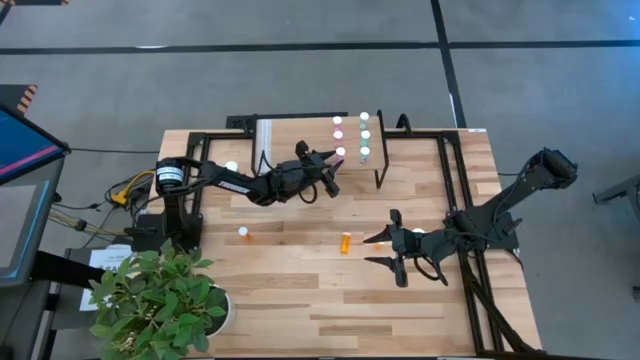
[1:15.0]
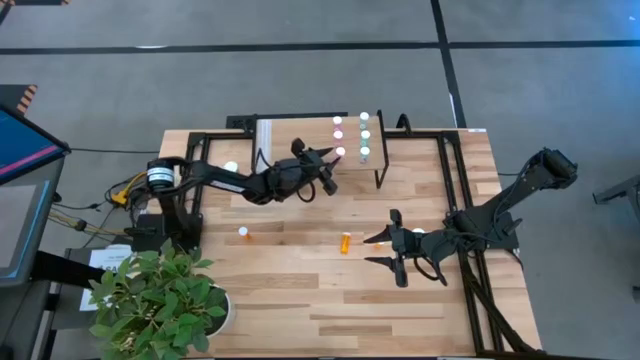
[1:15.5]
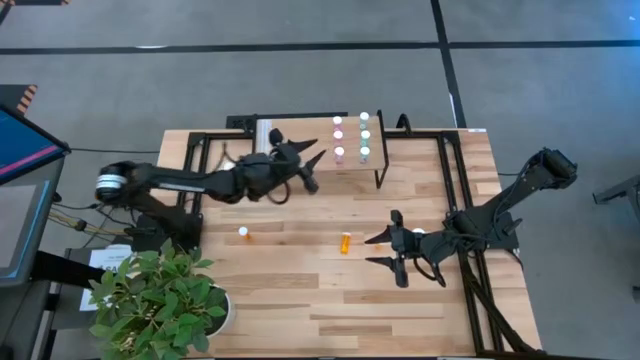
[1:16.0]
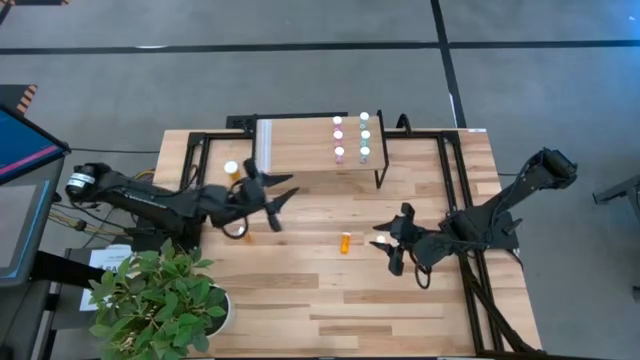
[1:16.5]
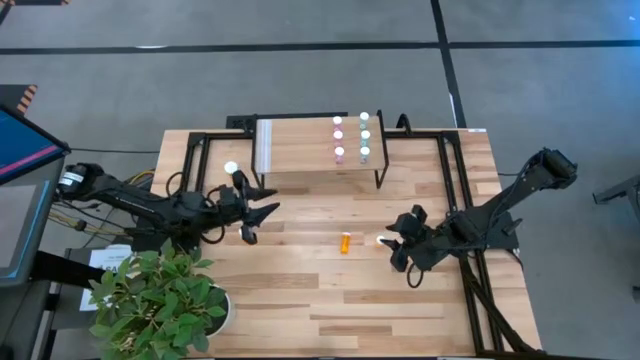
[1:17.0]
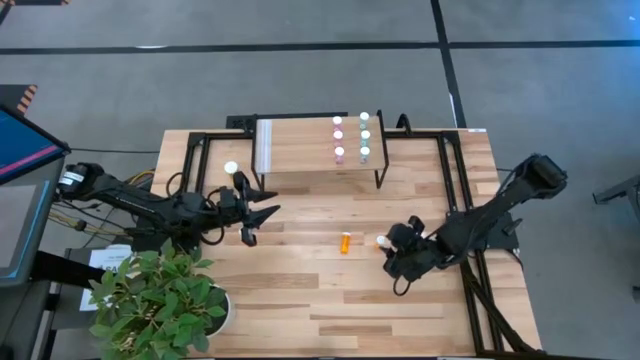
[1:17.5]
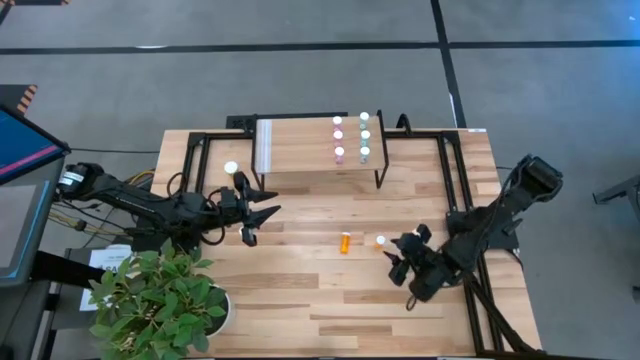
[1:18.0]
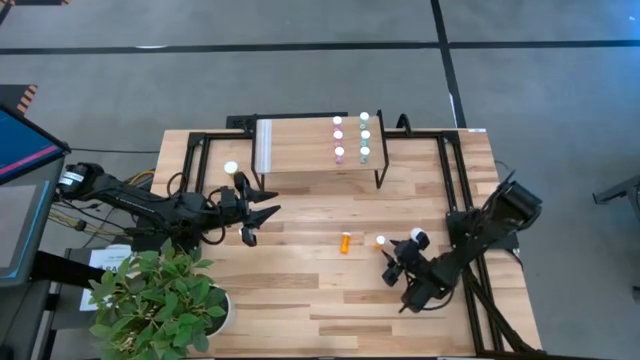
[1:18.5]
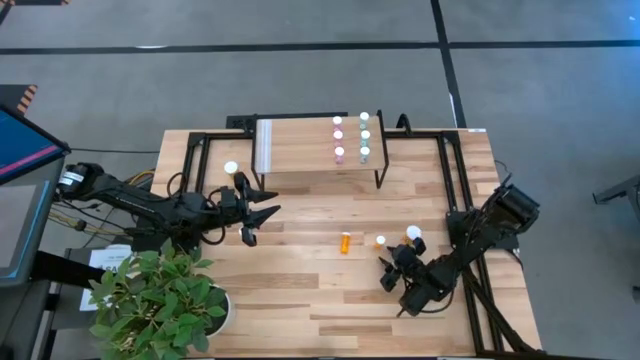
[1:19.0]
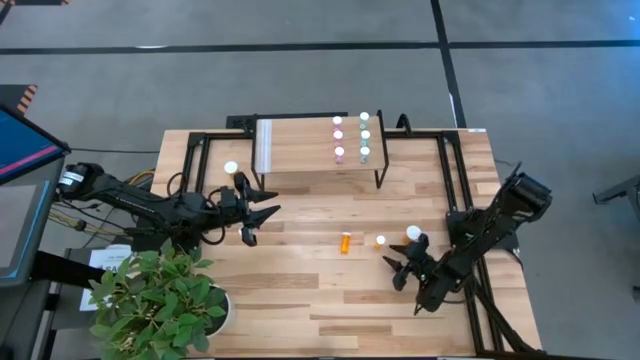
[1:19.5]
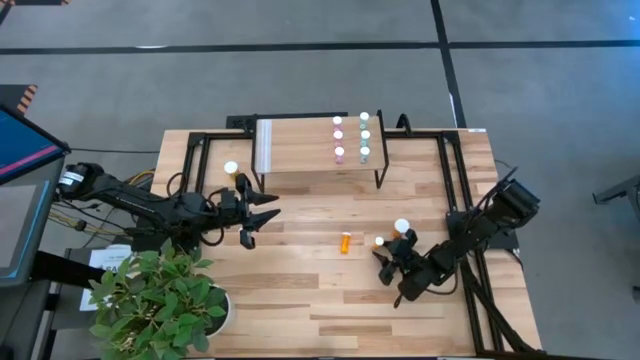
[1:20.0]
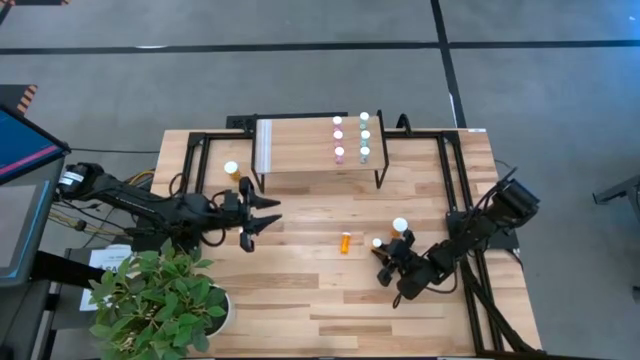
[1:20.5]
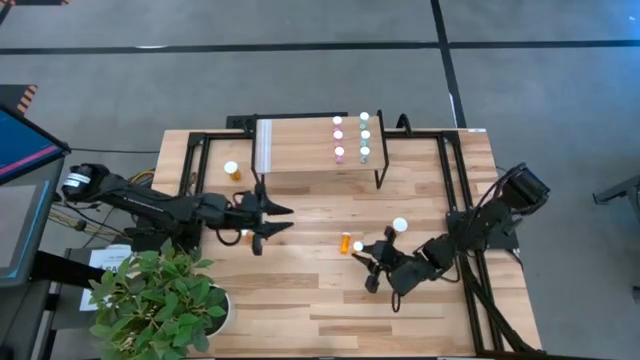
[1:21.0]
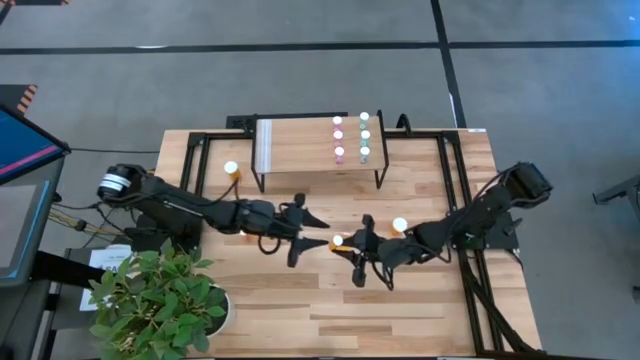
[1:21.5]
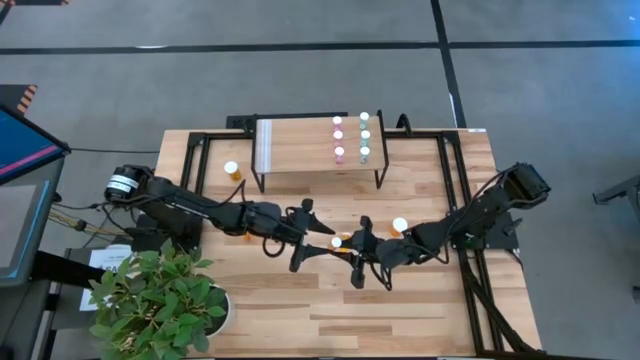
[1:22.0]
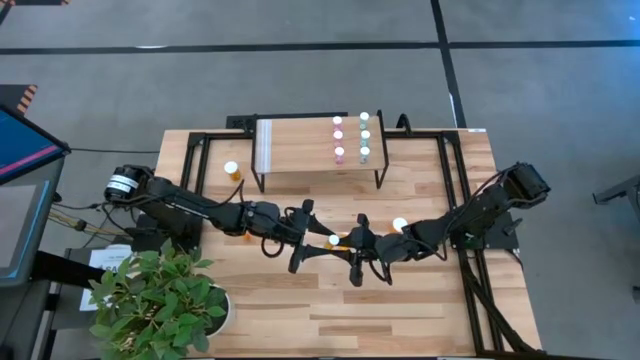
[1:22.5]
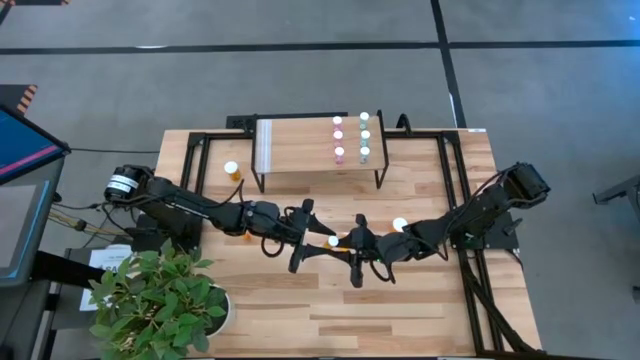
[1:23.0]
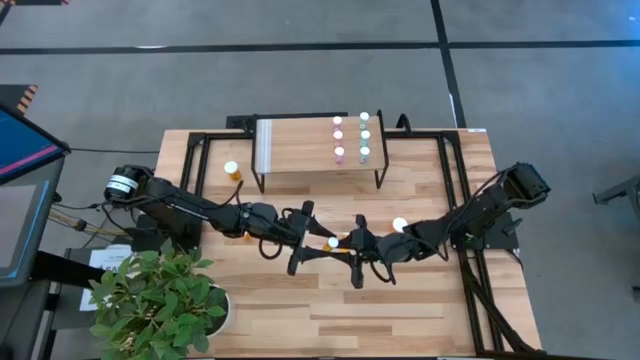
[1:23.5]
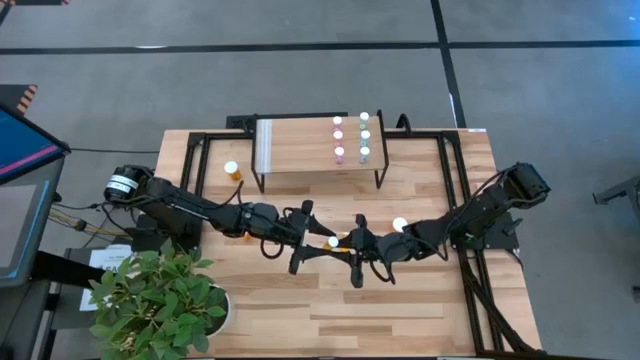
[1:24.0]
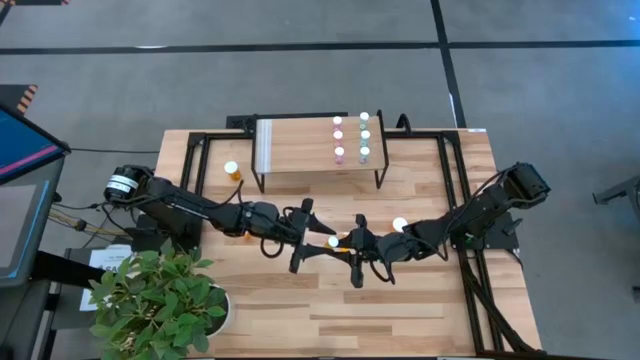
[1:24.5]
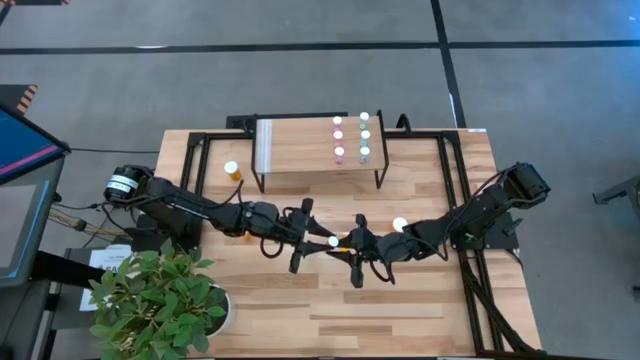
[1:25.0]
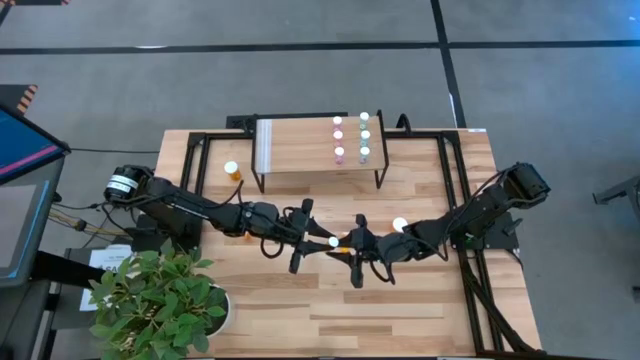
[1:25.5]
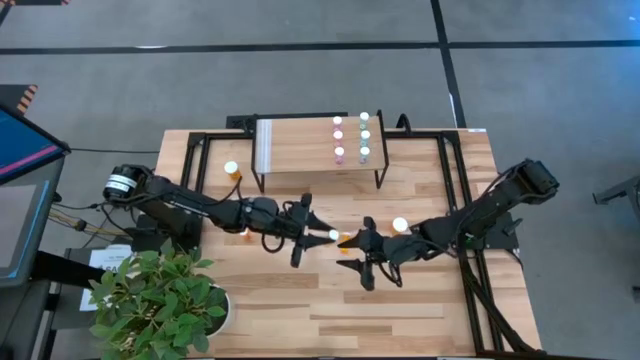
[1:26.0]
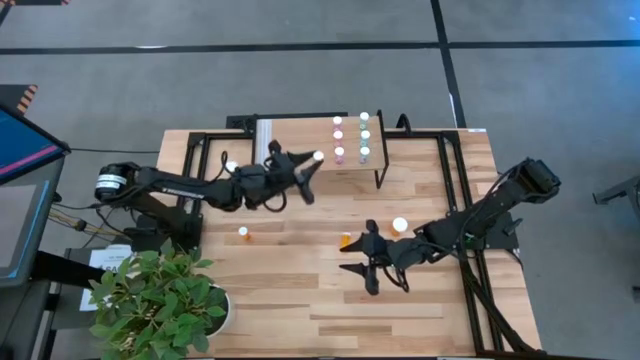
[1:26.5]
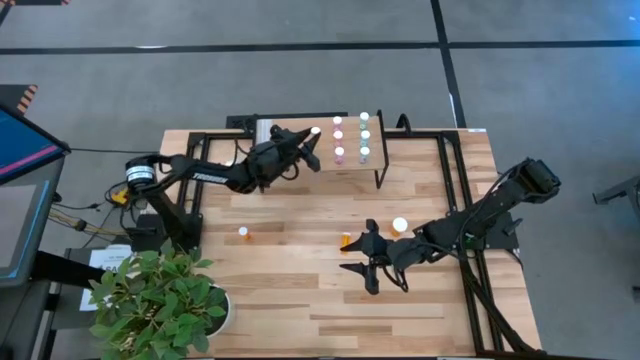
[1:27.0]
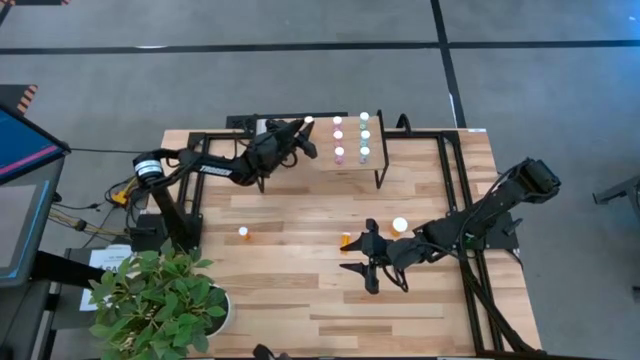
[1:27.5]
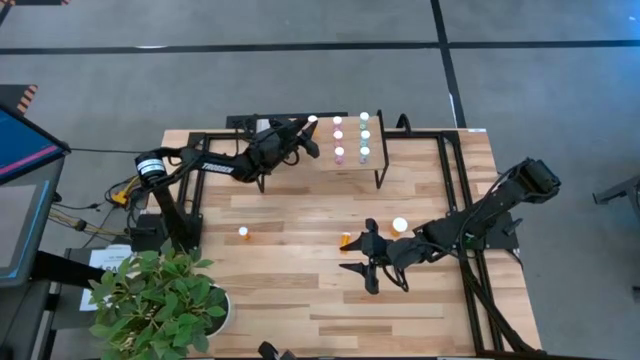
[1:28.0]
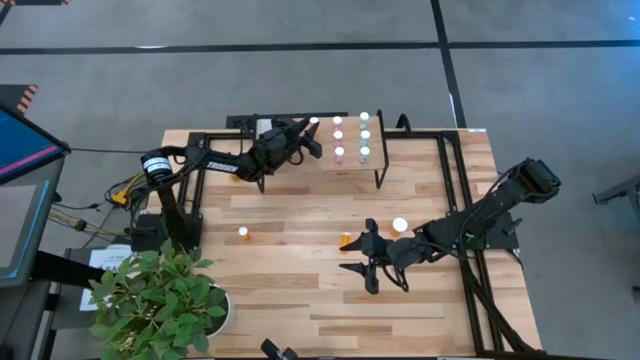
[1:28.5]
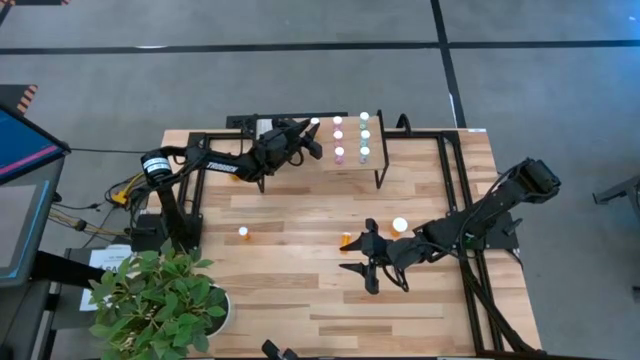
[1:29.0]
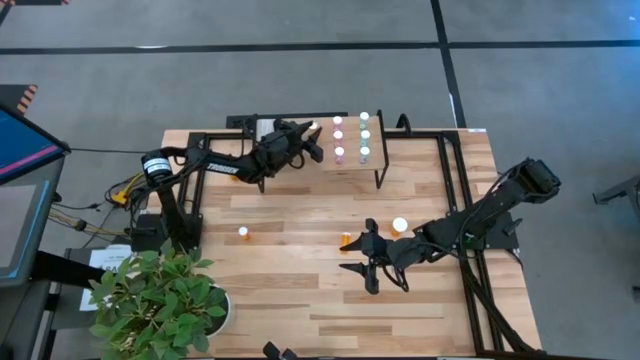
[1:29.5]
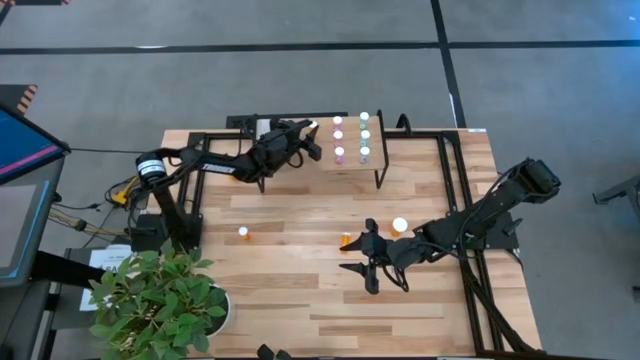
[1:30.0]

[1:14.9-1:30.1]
Task: Pick and place medicine bottles onto shelf by color
Put the right small orange pill bottle on the shelf

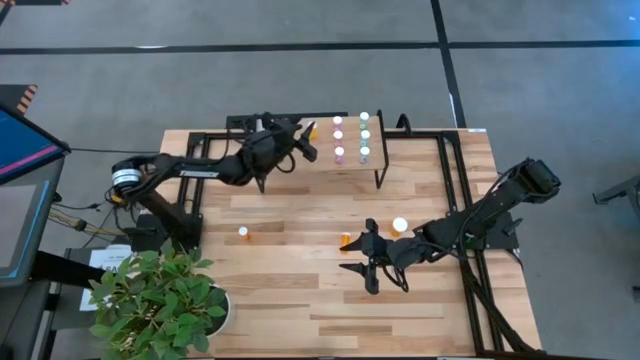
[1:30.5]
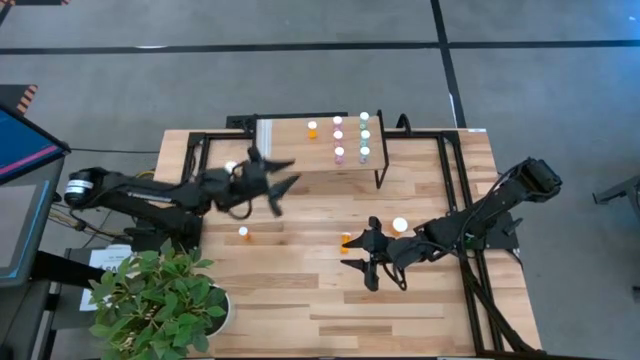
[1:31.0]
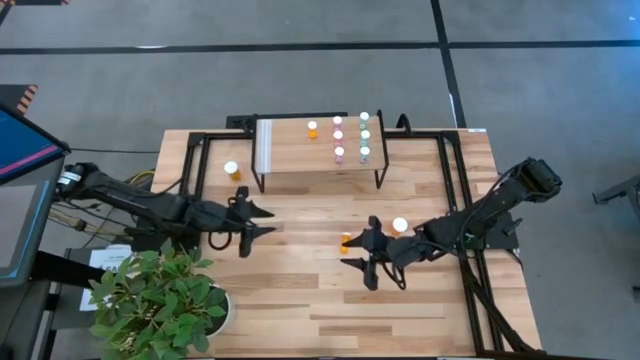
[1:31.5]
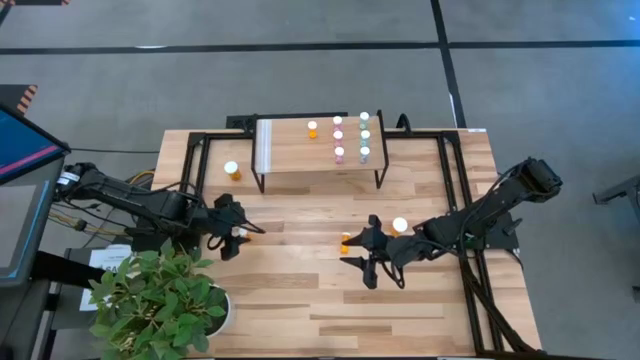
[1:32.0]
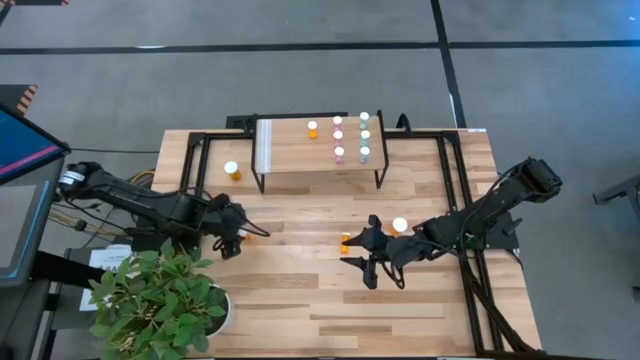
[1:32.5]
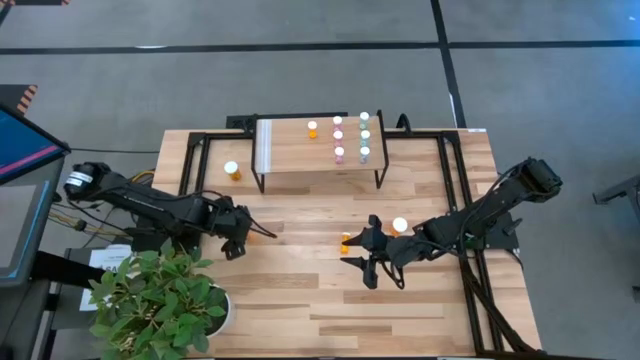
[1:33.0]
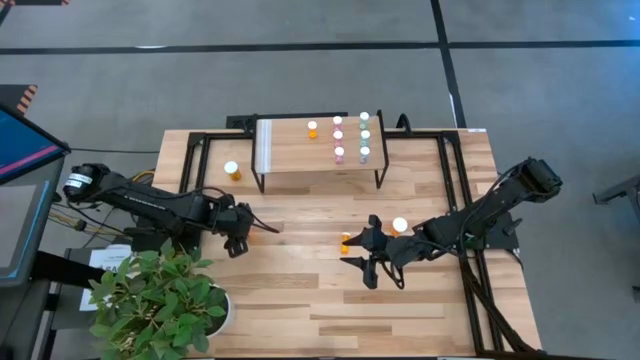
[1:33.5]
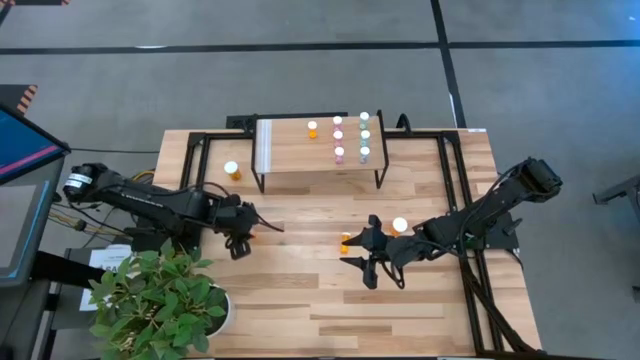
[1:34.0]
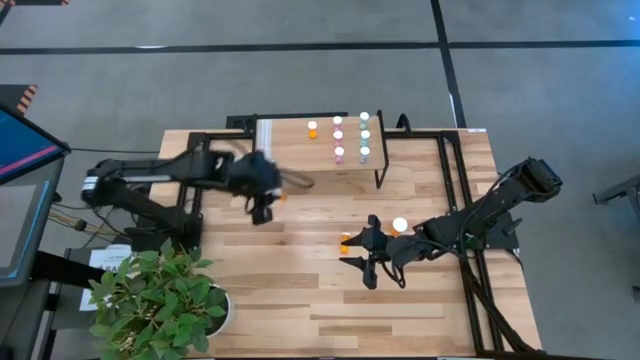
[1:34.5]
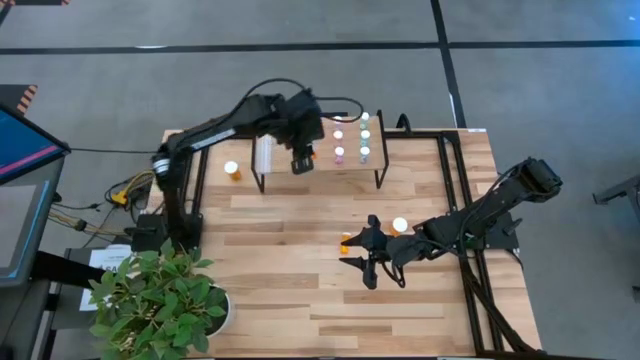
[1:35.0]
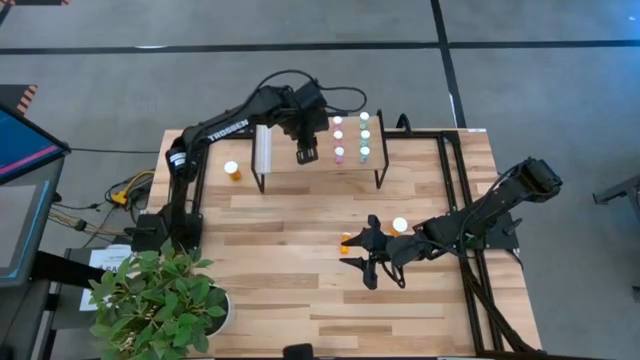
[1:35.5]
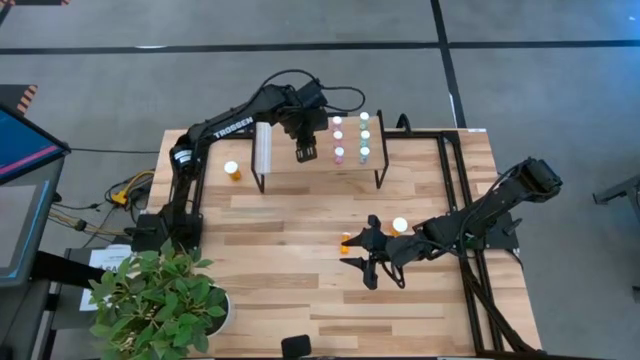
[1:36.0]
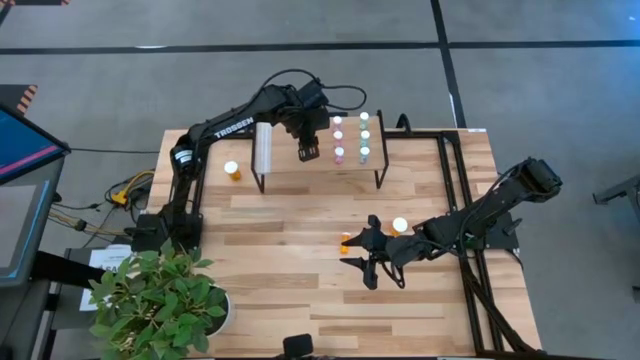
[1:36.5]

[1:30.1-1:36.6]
Align the left small orange pill bottle with the other small orange pill bottle on the shelf
